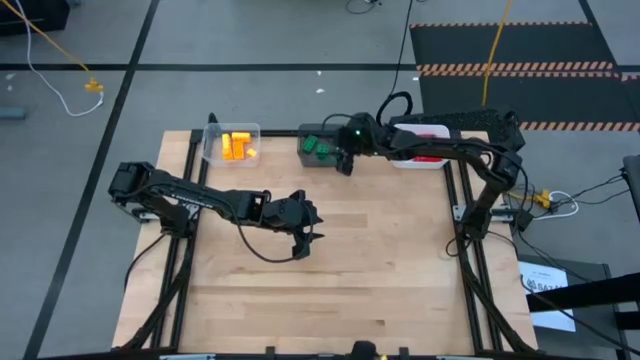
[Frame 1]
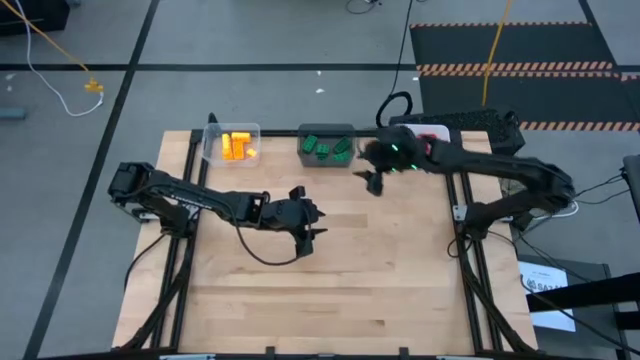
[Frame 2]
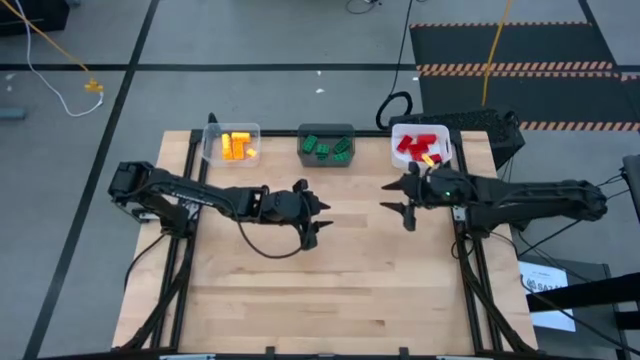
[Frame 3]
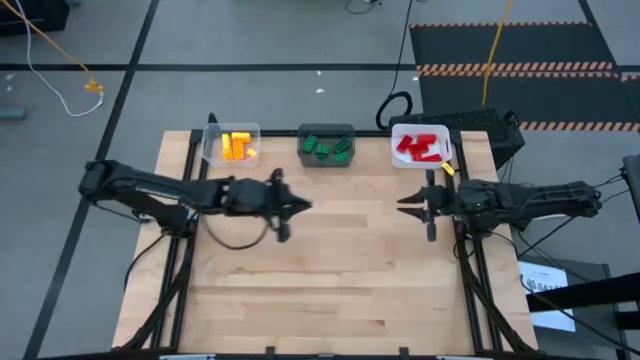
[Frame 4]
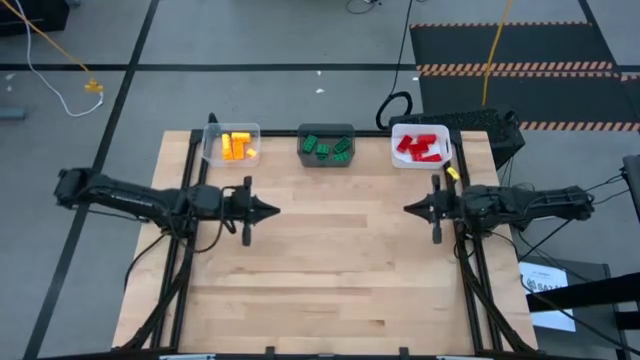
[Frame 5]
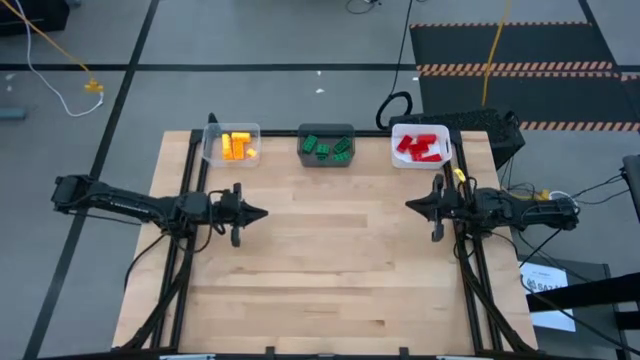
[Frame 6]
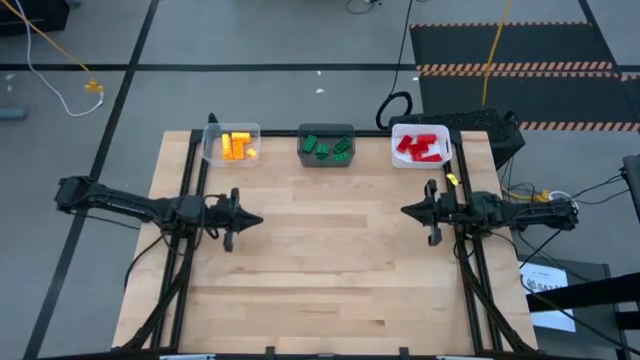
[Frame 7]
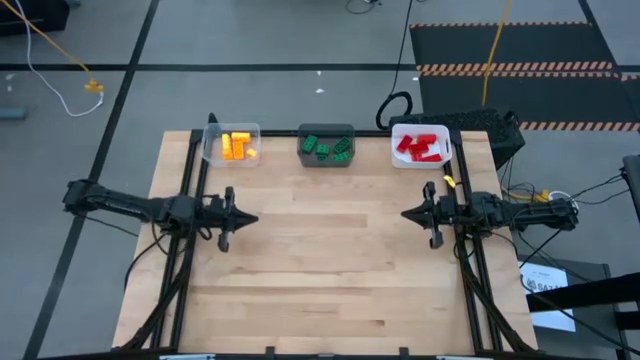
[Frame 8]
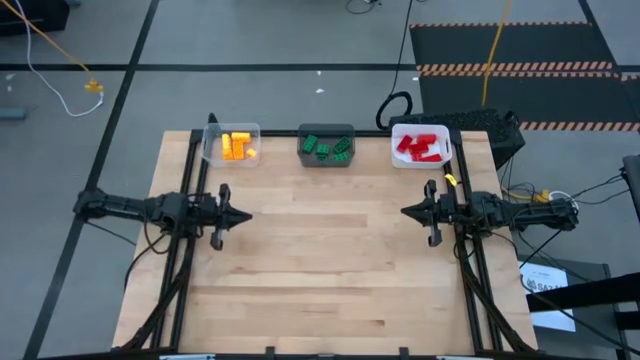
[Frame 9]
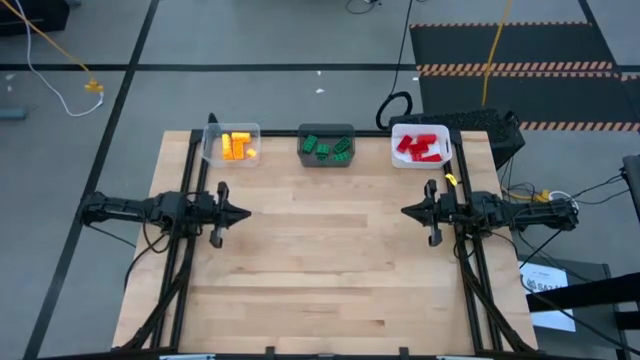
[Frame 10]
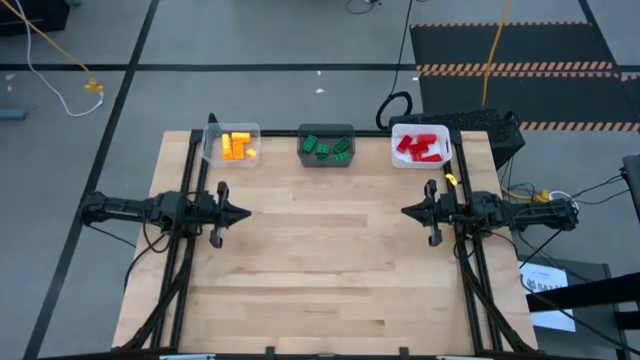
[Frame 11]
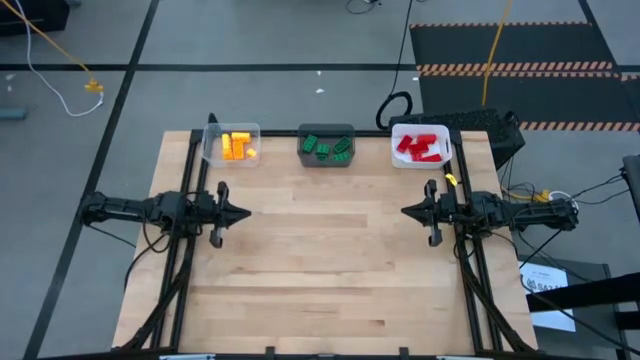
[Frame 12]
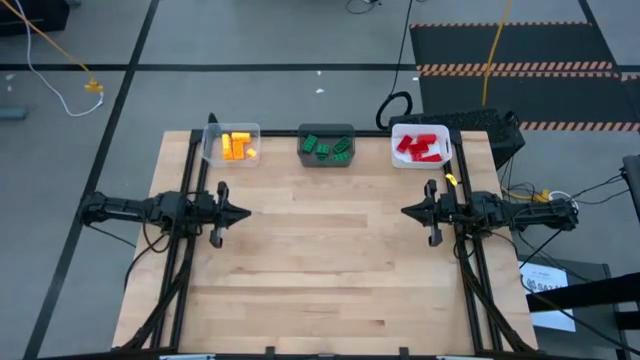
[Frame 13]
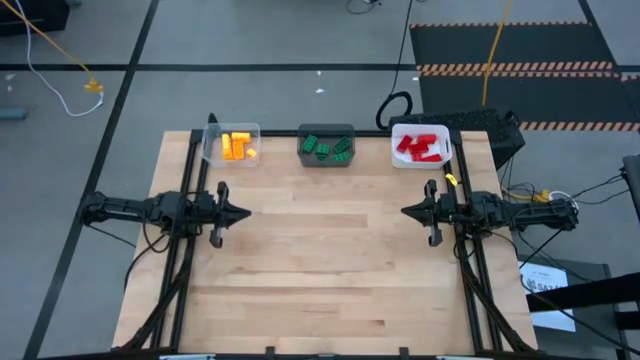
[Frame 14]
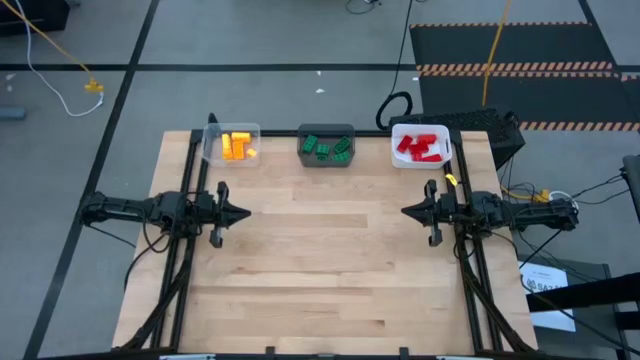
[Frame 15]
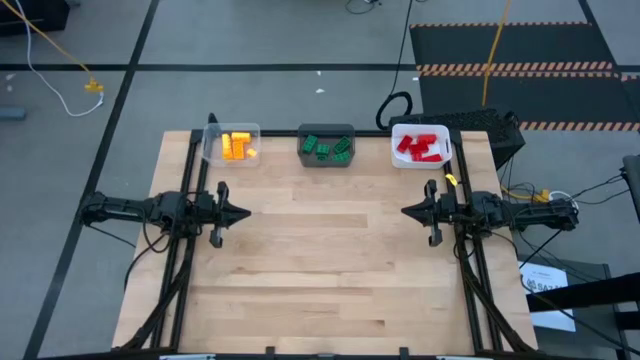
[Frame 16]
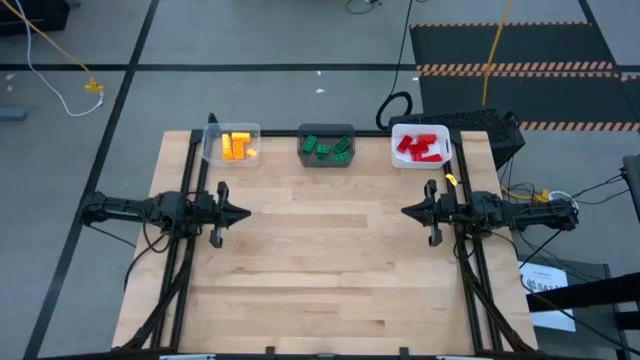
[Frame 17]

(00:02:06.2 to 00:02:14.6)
Task: Sort & place blocks by color
Return to Home Position

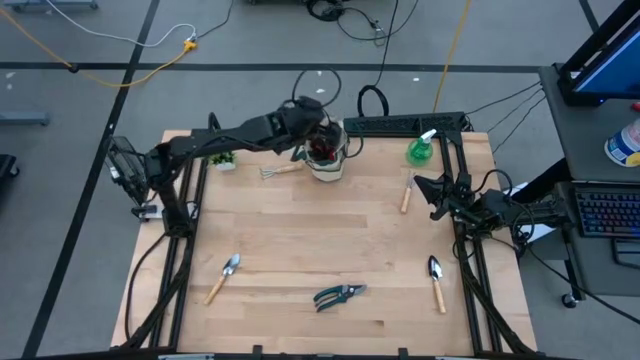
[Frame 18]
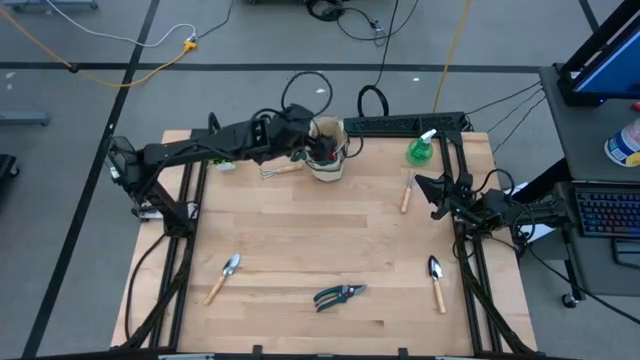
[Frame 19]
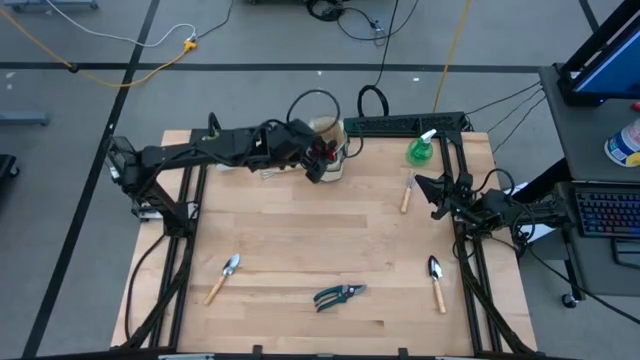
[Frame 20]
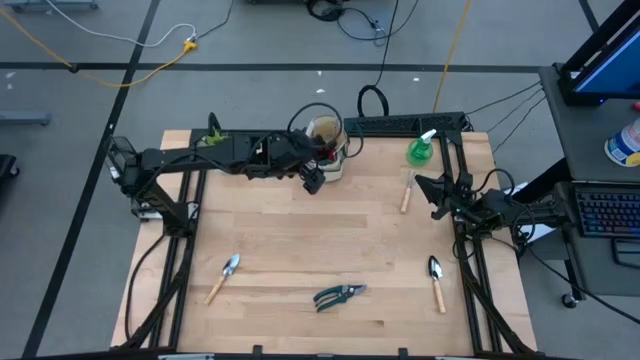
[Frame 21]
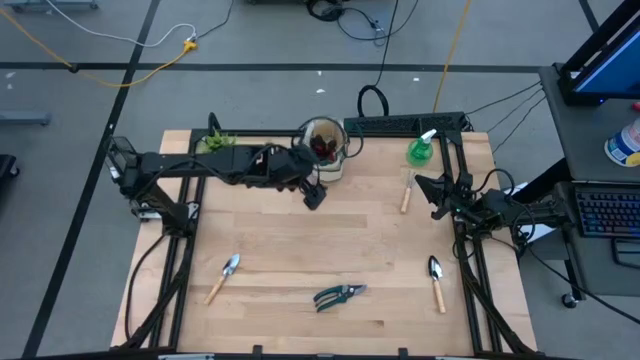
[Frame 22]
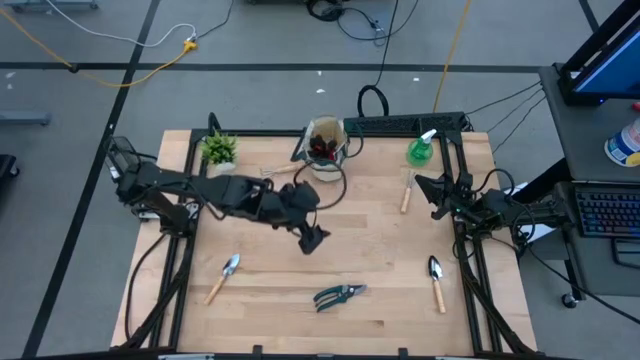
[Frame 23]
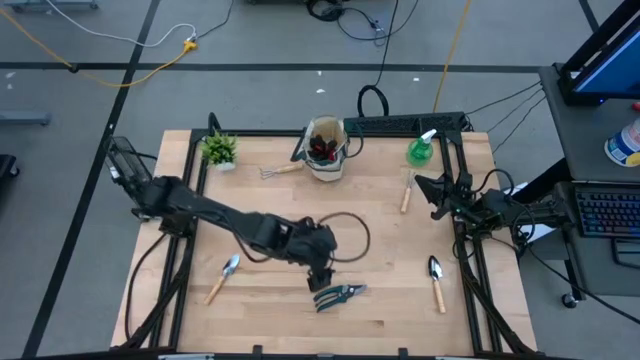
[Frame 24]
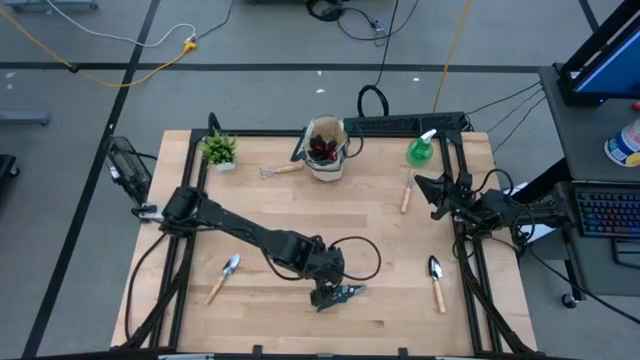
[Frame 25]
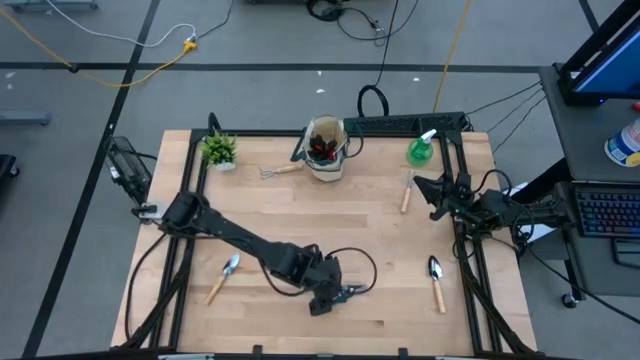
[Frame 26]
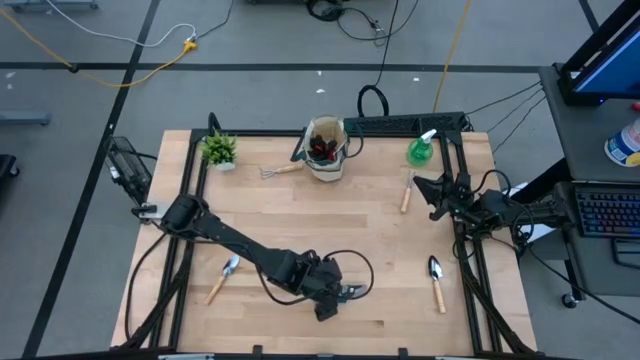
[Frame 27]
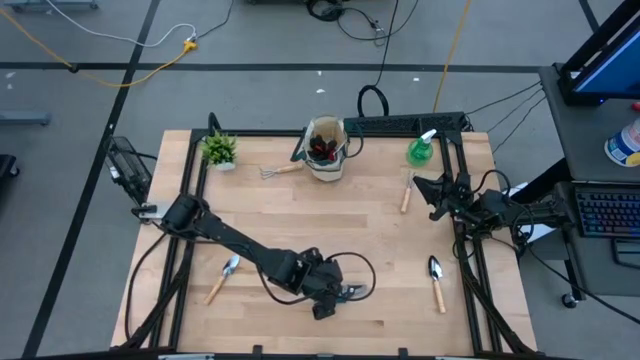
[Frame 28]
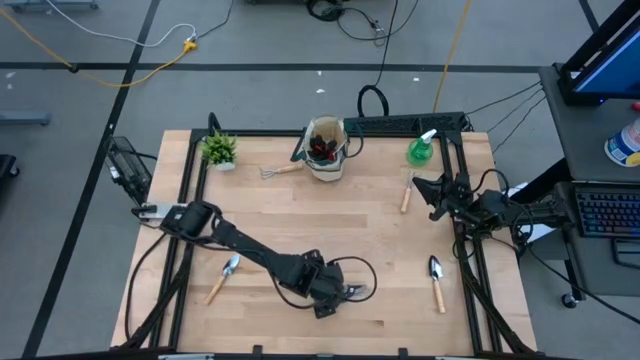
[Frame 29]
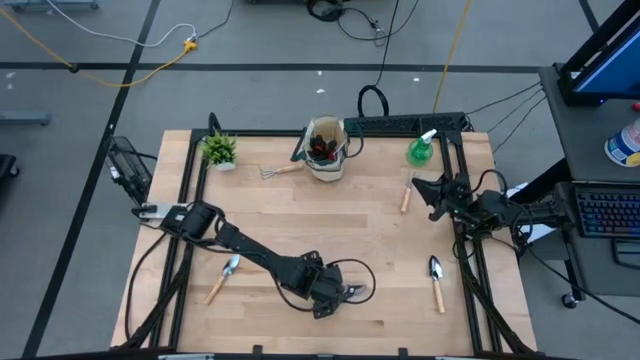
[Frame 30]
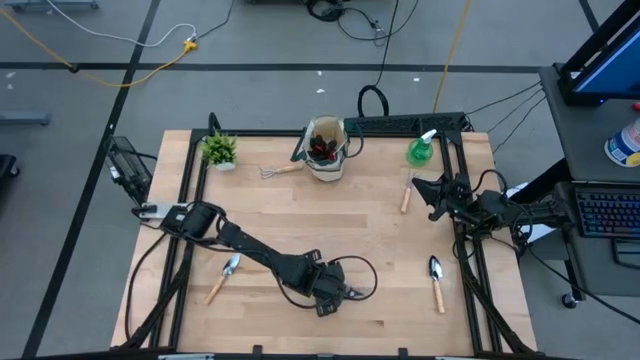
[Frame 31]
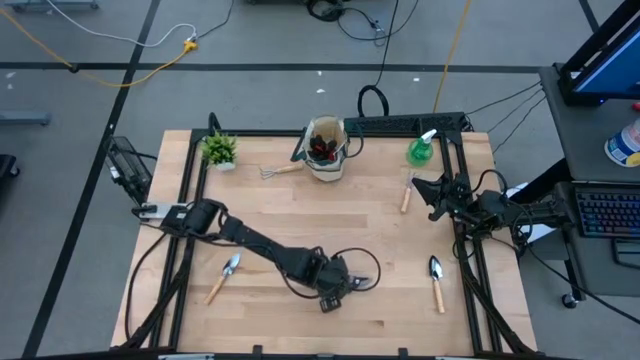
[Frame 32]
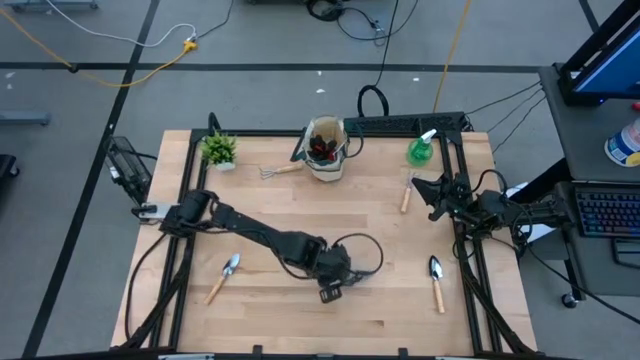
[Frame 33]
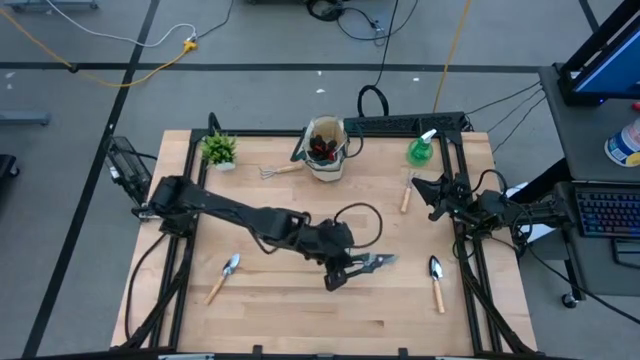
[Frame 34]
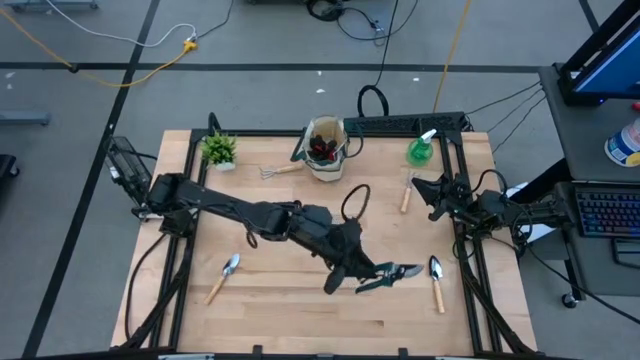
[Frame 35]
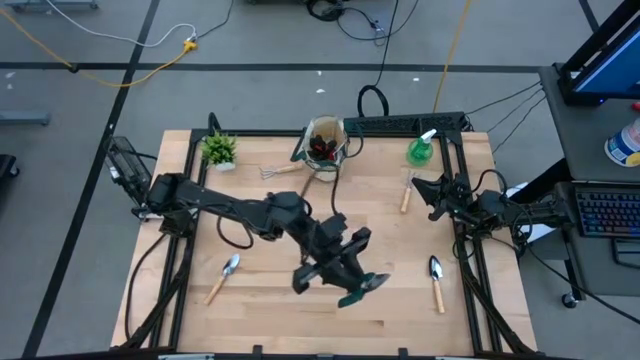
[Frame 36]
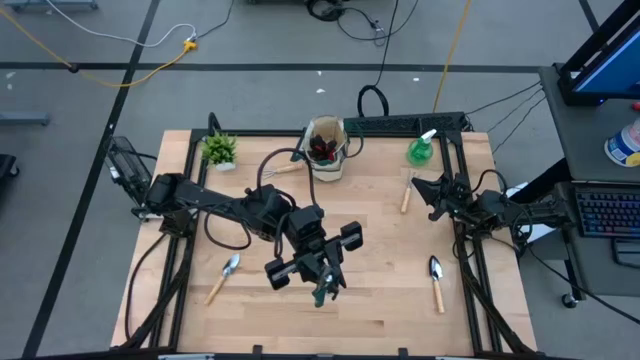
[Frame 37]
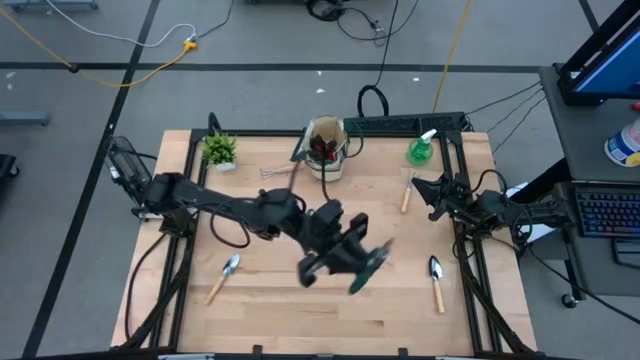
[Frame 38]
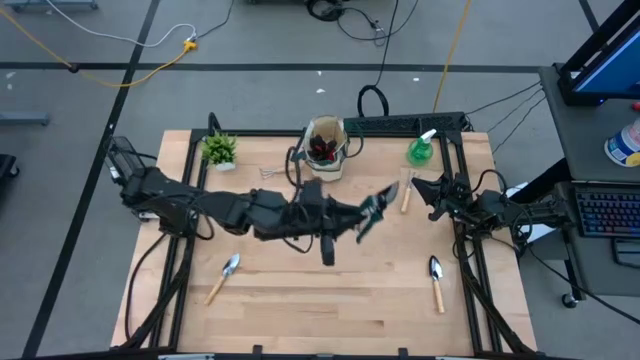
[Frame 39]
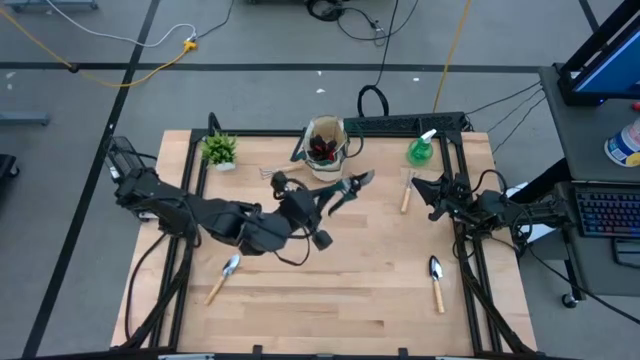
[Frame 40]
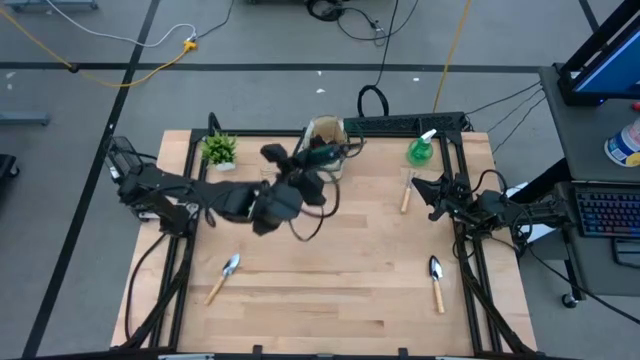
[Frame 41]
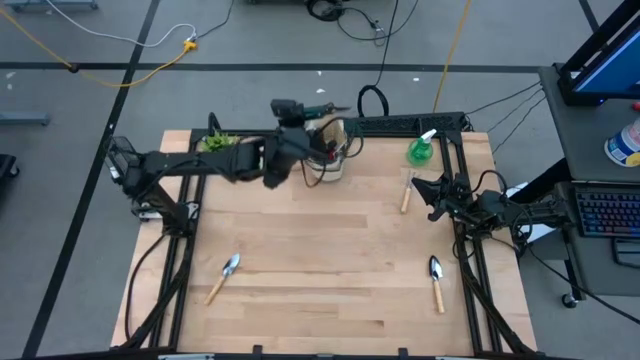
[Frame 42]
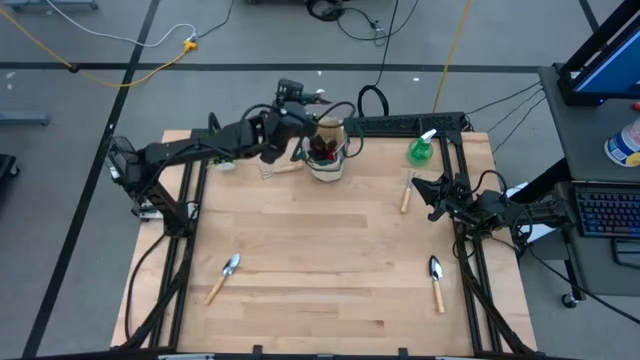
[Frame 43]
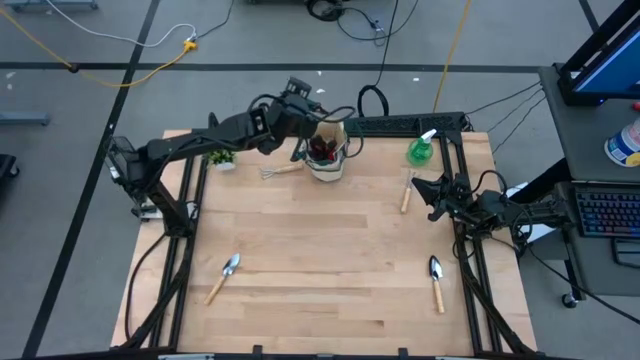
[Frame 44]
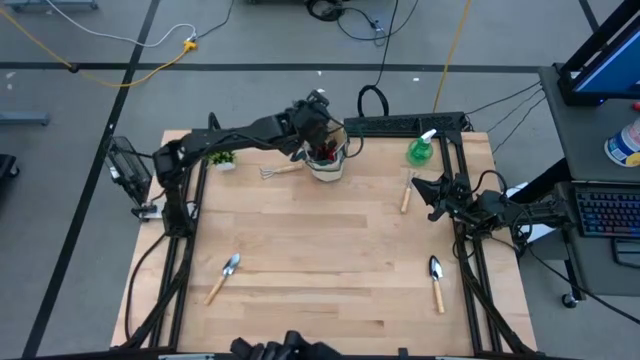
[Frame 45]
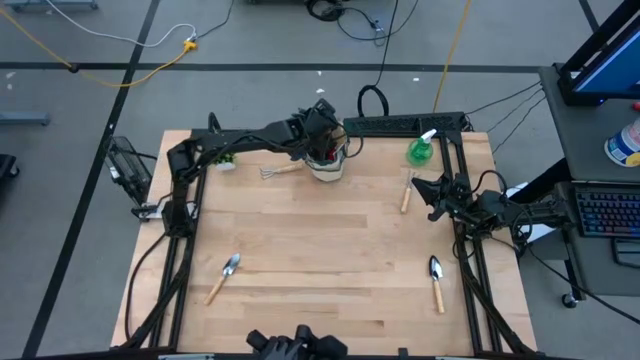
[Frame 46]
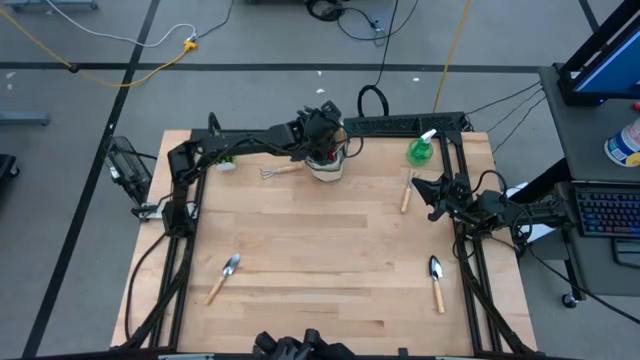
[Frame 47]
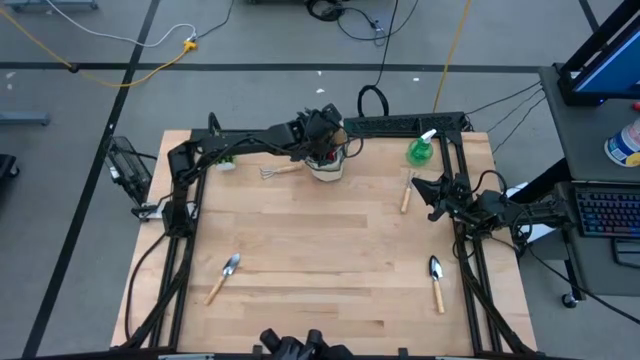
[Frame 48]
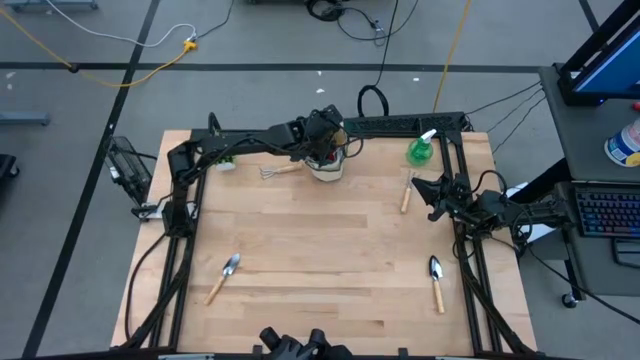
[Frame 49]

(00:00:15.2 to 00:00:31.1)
Task: Pick & Place Garden tools in Gardening bag
Put the green scissors into the green gardening bag
